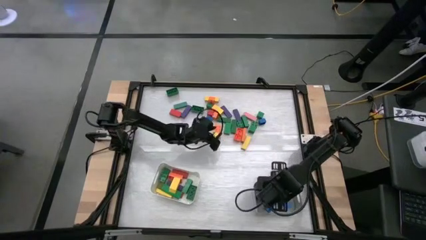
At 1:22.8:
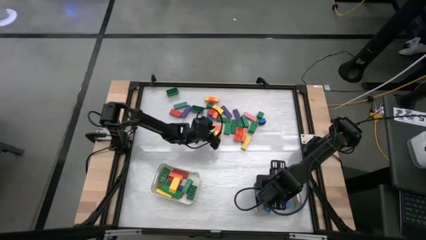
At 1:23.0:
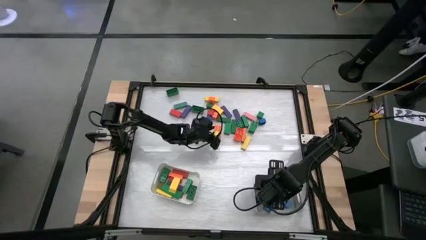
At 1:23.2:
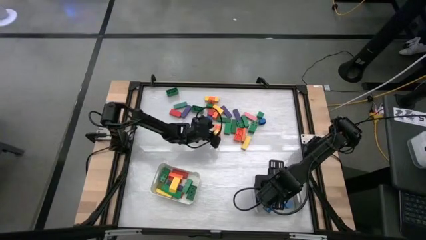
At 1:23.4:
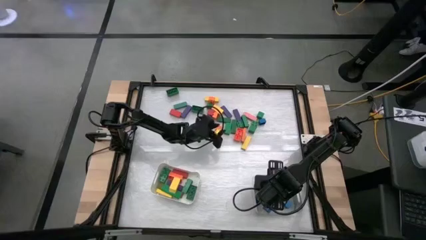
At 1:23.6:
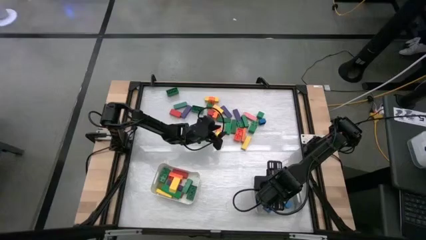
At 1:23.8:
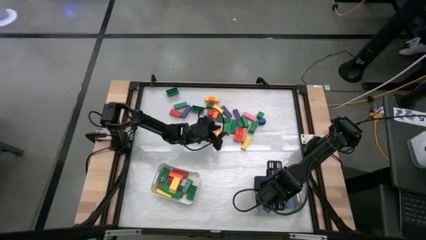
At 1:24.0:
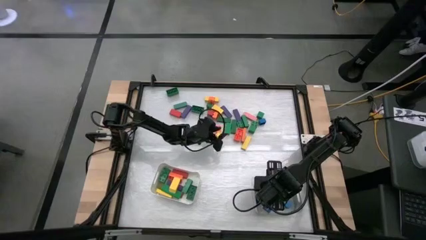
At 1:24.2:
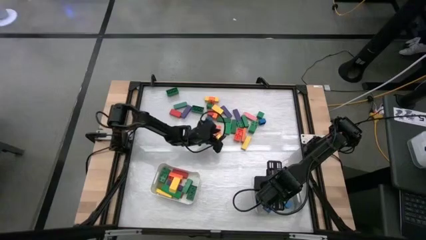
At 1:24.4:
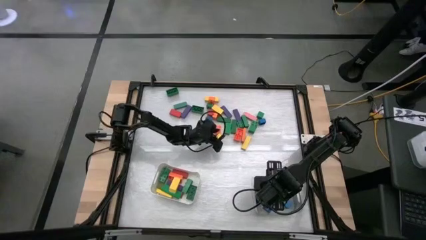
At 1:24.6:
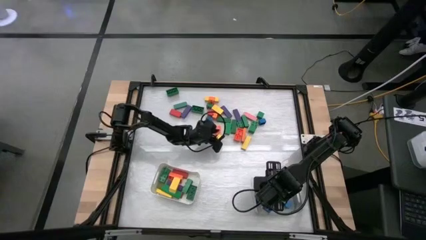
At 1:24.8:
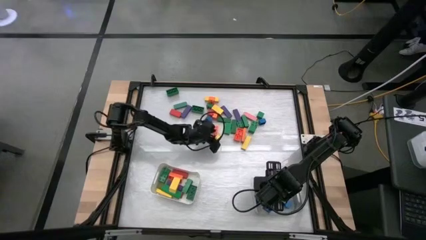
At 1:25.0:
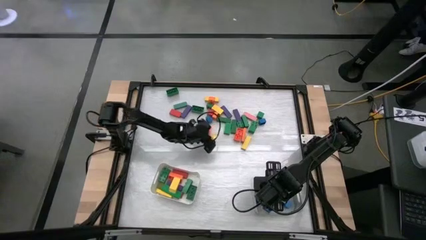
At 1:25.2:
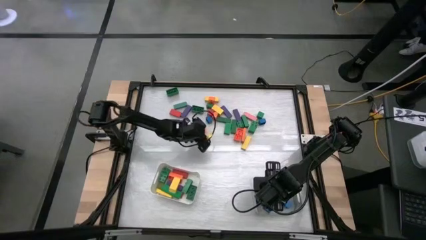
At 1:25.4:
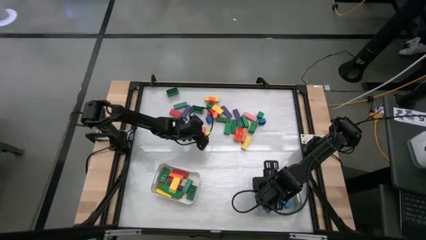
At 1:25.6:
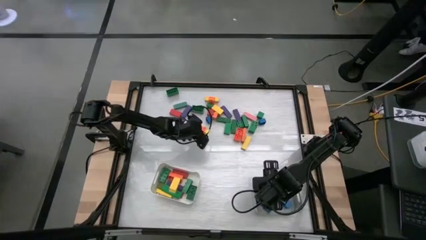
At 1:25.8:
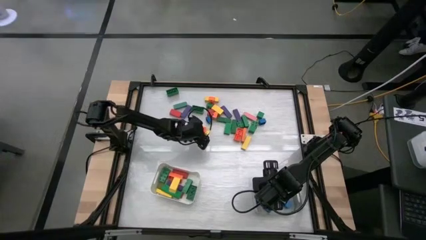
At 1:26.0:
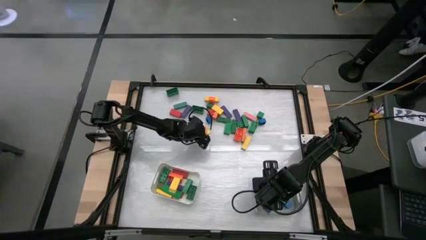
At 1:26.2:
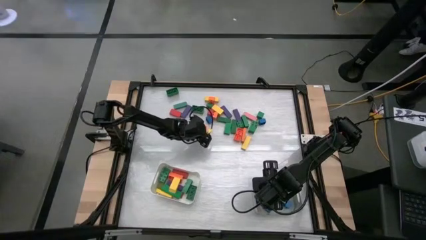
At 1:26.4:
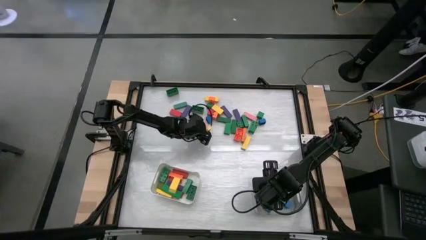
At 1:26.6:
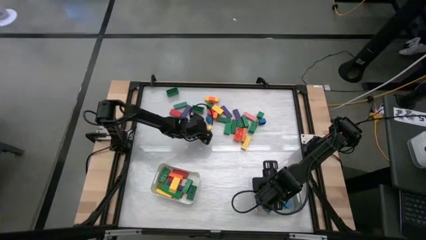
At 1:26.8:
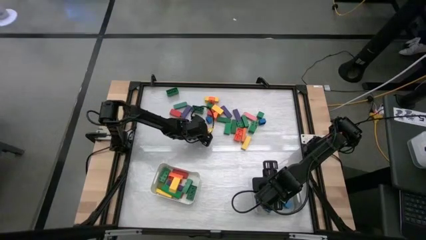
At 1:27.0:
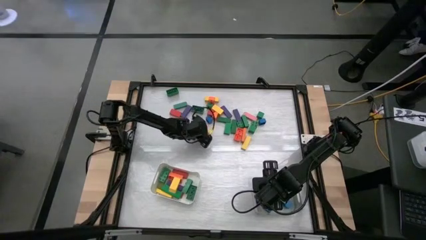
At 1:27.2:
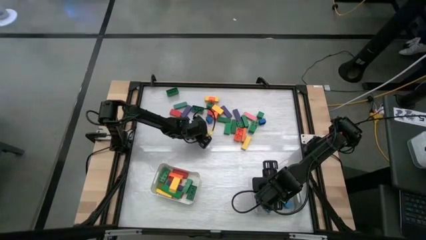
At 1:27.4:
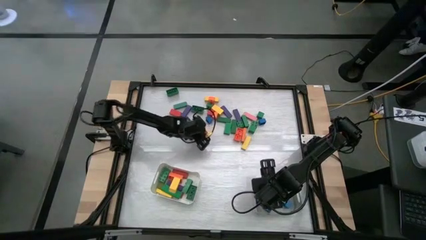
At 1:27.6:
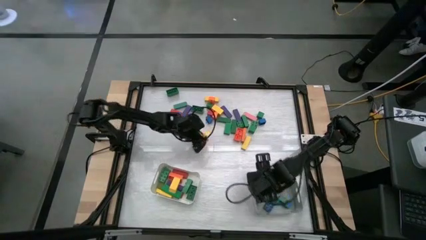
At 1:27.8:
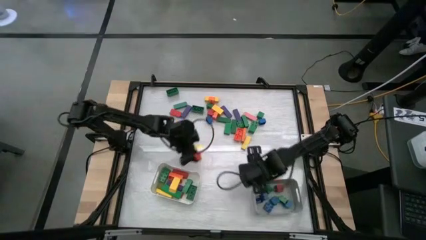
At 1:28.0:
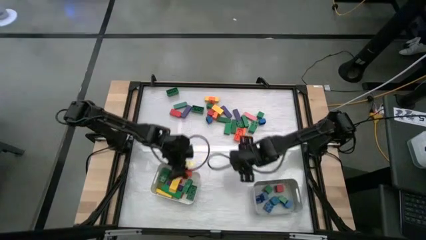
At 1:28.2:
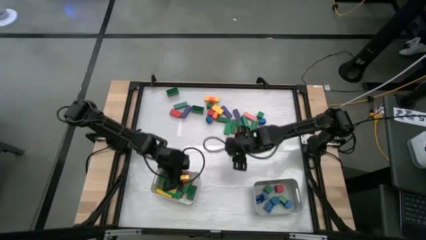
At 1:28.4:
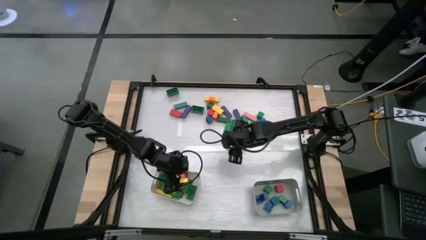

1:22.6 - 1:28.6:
Task: Sort blocks by size
Put the rectangular orange game piece into the white bin

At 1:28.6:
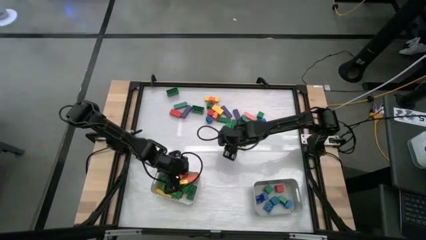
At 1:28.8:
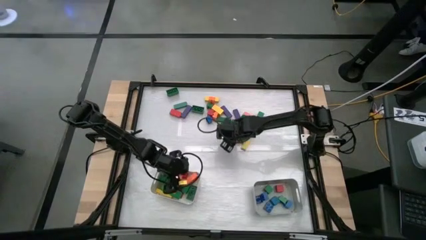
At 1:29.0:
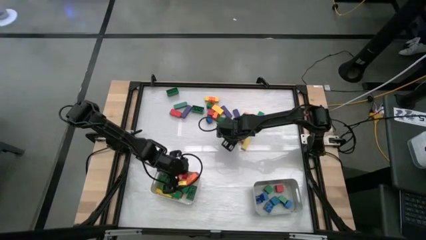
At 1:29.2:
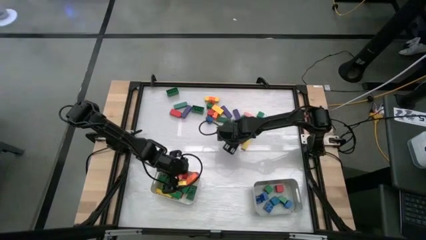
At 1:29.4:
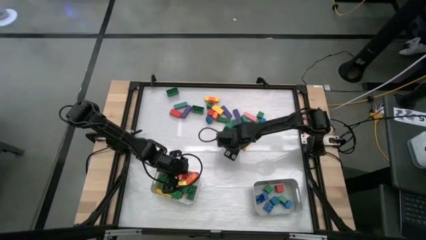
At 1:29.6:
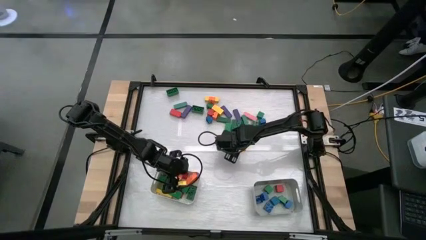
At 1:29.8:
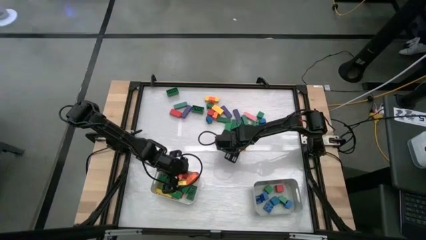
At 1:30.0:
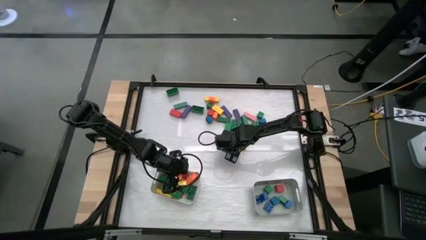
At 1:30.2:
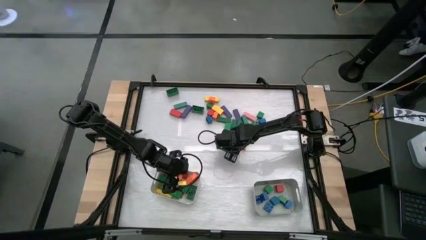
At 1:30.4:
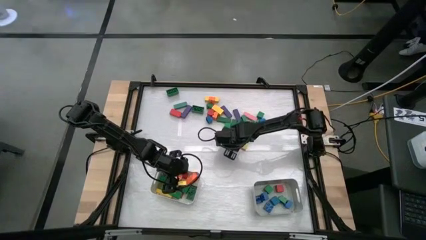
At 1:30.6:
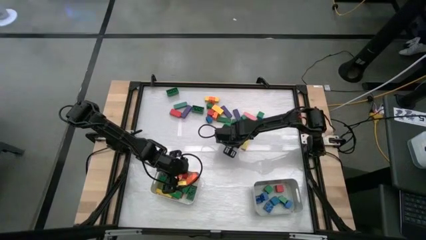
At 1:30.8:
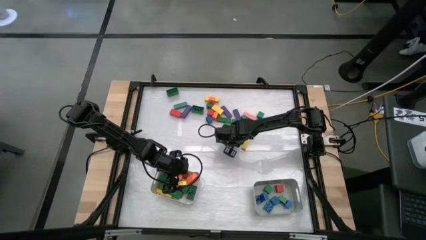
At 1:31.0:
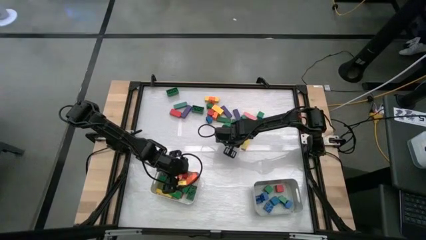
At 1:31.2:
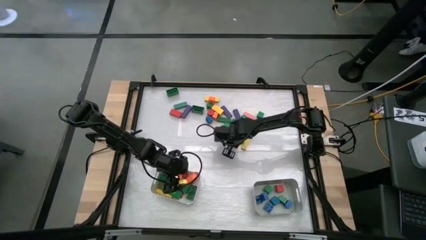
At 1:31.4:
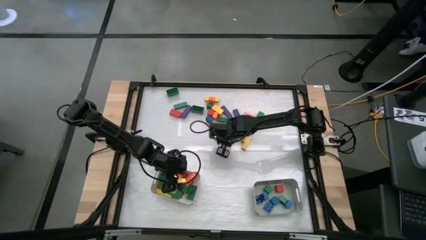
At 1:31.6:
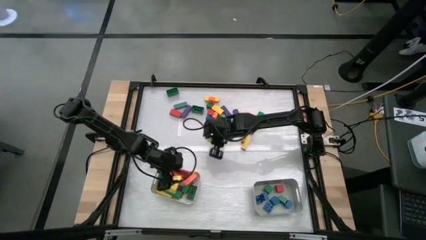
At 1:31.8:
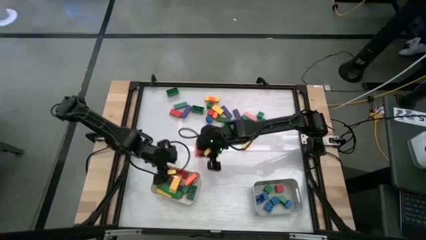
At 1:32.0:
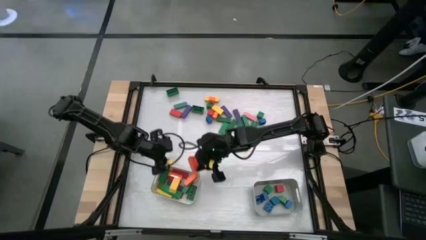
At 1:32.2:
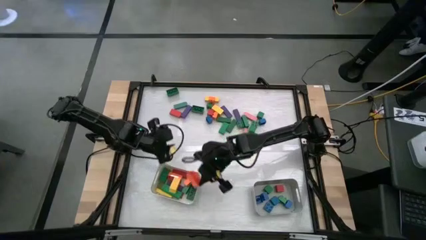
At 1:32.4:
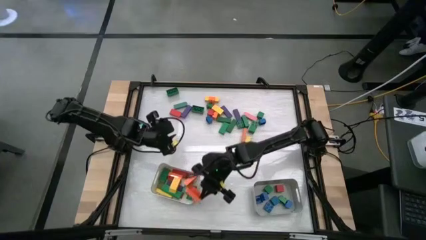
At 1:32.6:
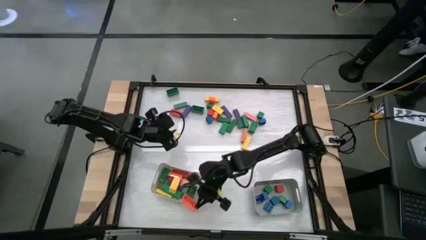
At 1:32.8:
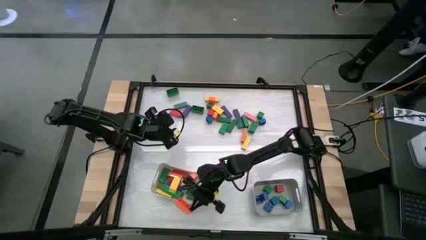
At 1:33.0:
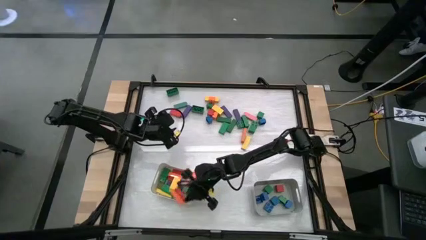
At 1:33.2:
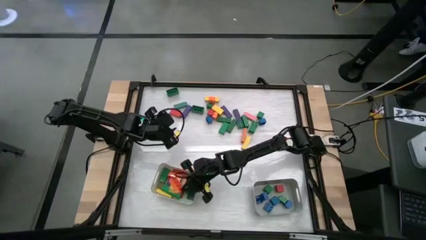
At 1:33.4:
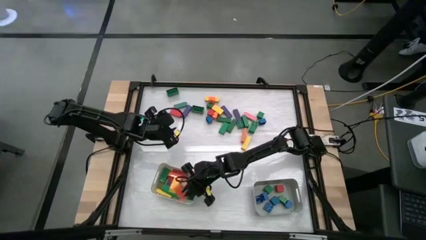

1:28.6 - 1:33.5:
Put the rectangular orange game piece into the white bin

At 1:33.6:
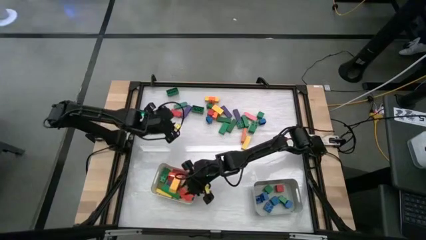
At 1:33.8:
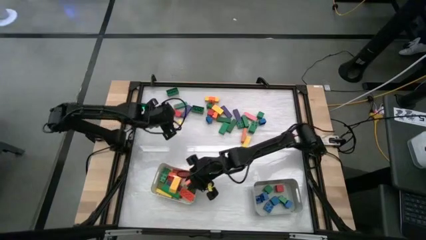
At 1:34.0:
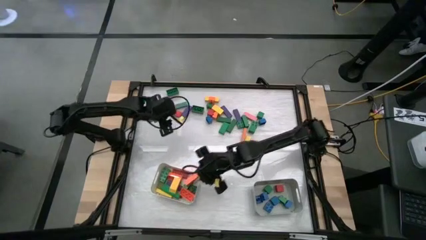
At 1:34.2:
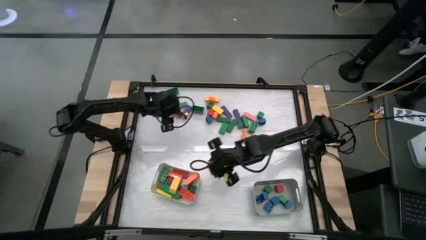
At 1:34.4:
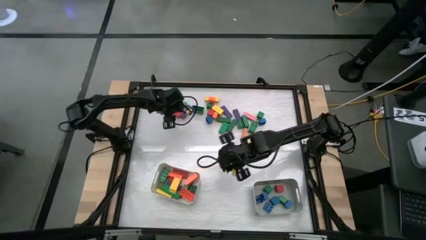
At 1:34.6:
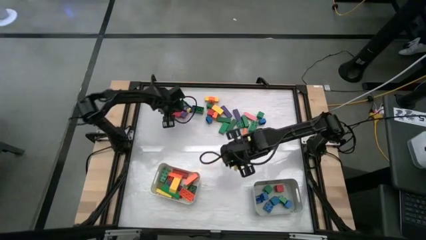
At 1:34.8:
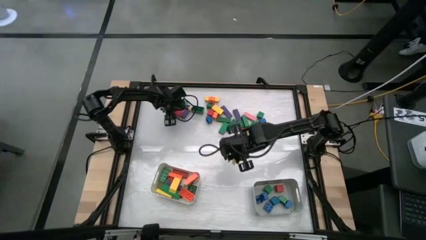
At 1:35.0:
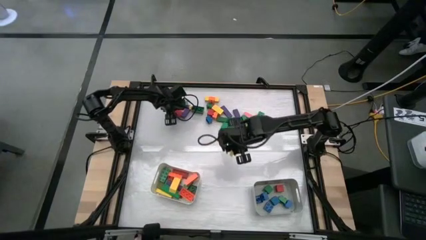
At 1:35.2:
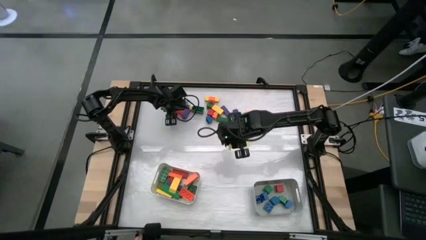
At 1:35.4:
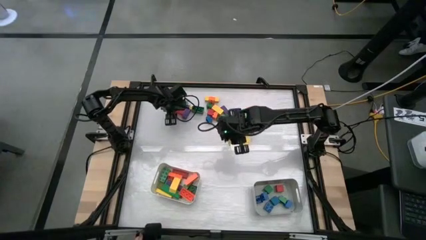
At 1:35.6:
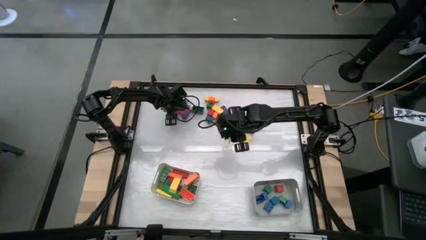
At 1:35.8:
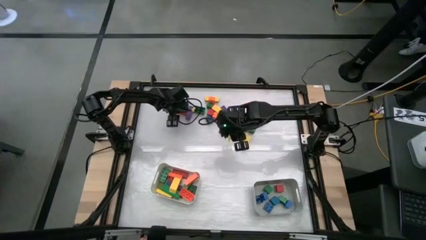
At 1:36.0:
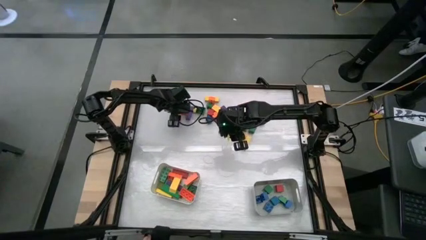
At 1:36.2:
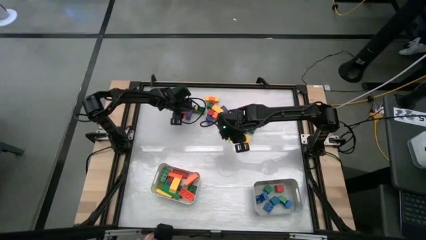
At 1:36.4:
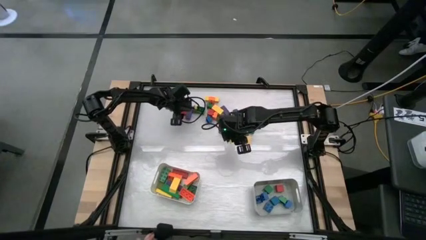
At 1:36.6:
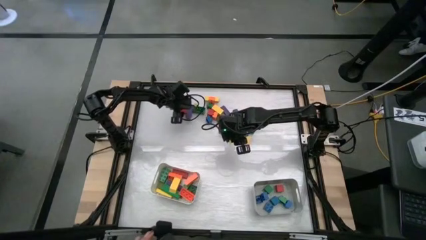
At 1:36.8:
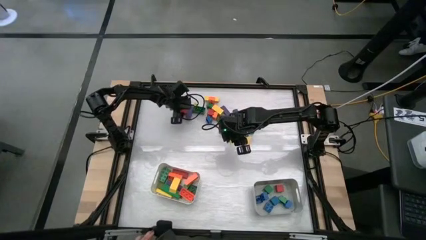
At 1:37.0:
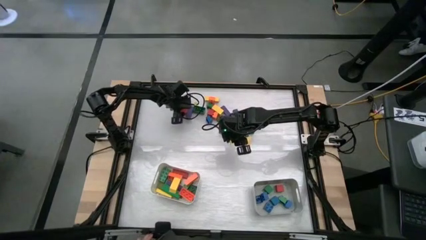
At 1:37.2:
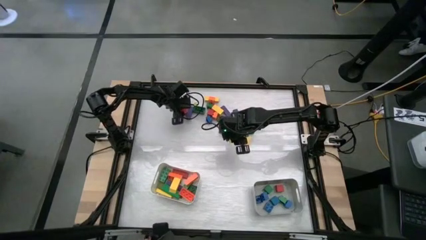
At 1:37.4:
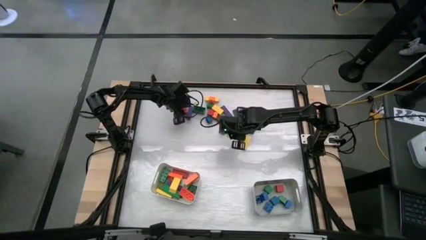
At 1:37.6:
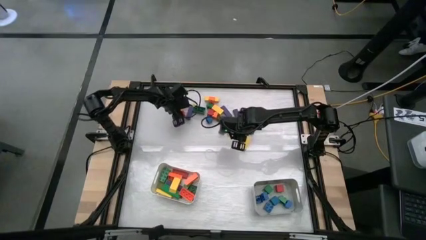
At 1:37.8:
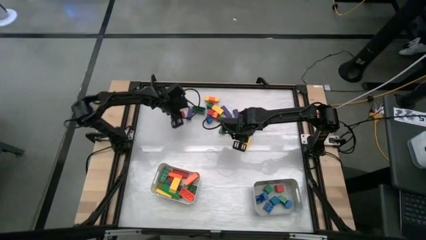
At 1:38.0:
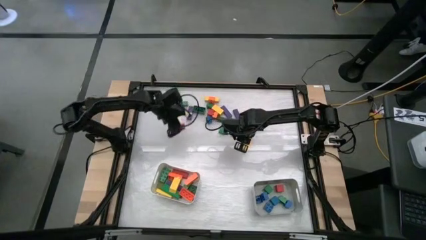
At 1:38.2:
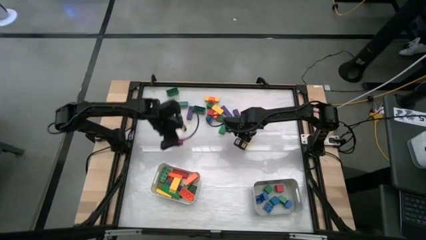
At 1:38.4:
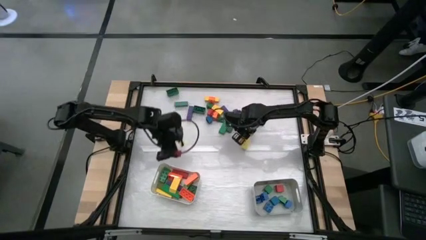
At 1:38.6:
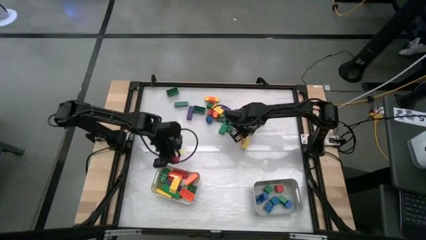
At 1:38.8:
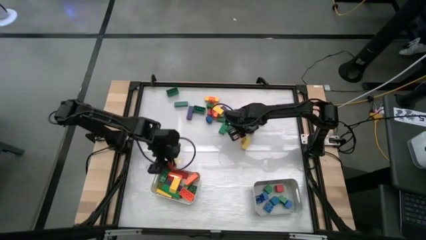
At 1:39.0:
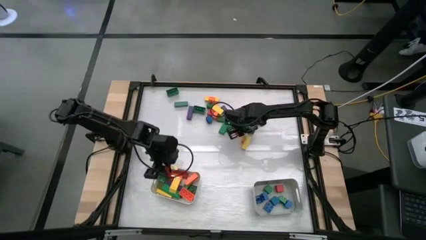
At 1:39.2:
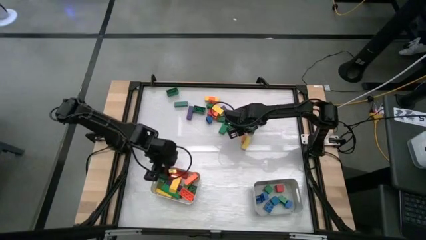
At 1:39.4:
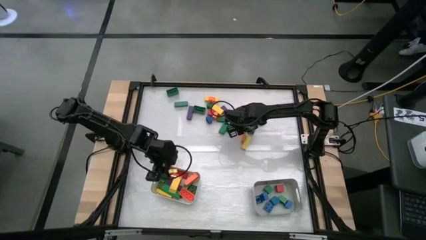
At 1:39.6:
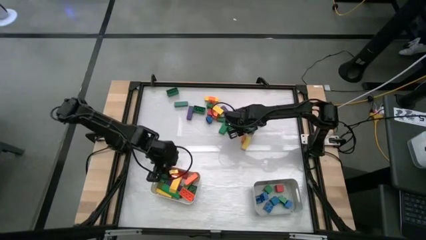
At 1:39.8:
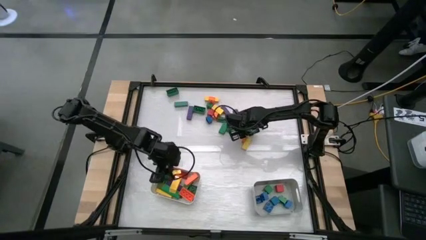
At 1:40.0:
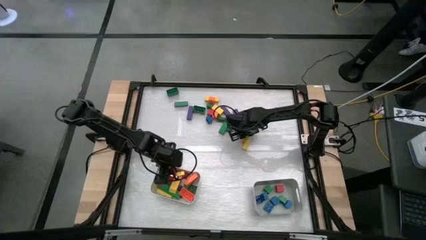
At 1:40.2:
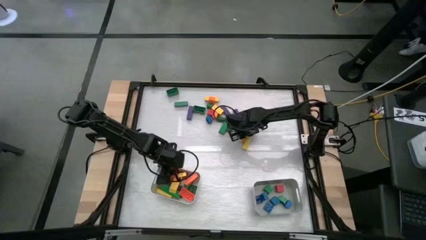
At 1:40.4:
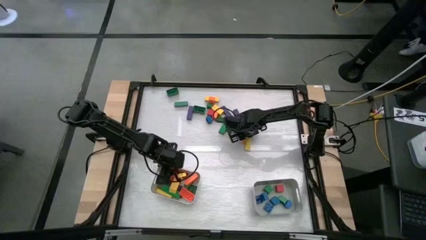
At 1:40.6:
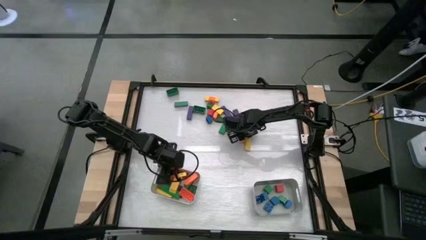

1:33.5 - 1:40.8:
Put the rectangular red block into the white bin
